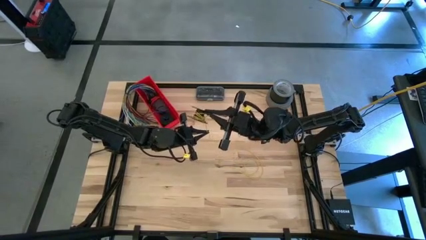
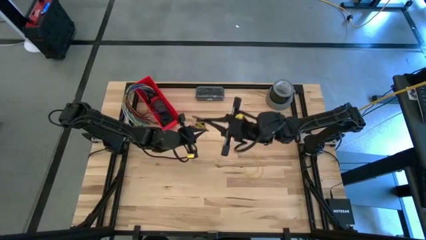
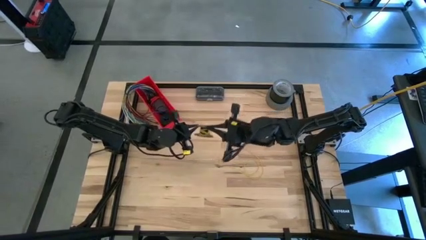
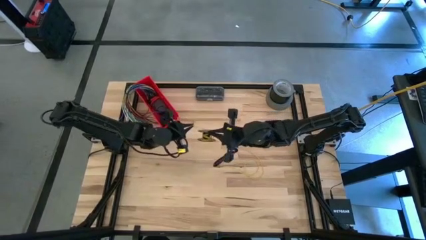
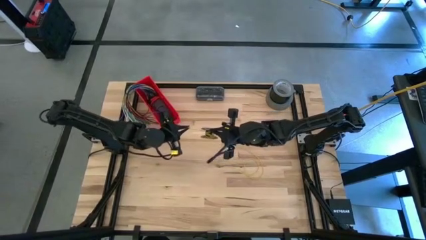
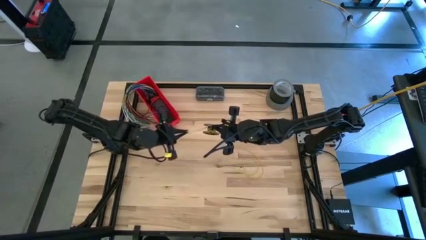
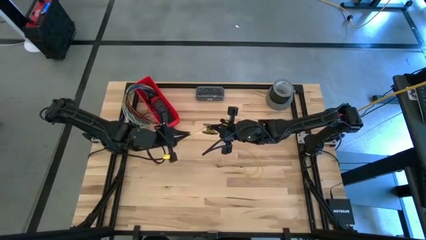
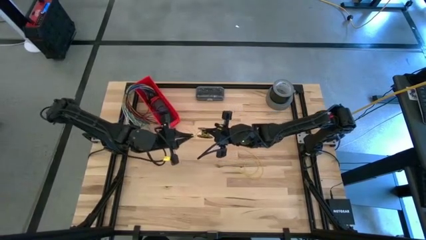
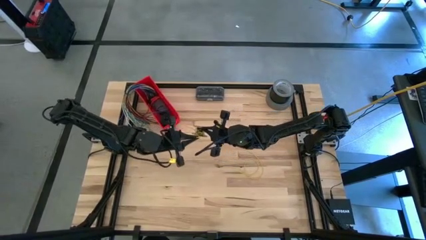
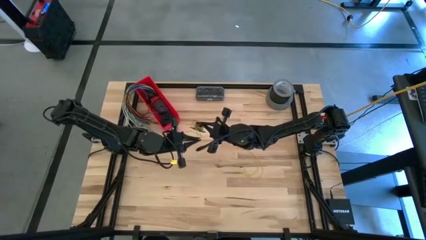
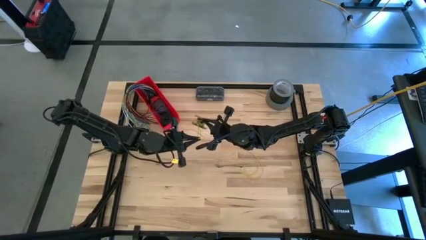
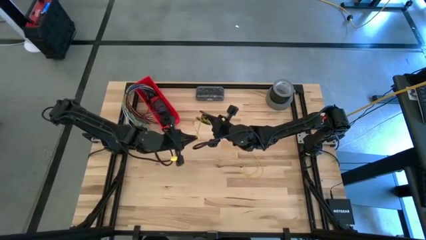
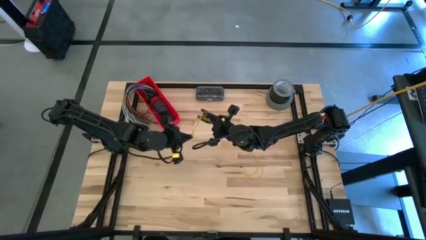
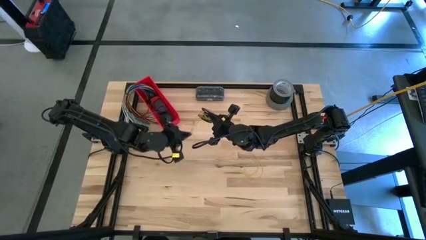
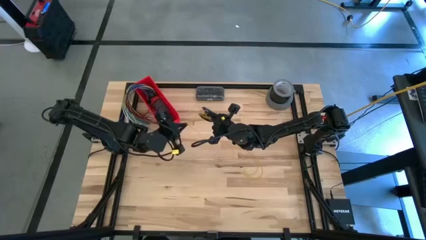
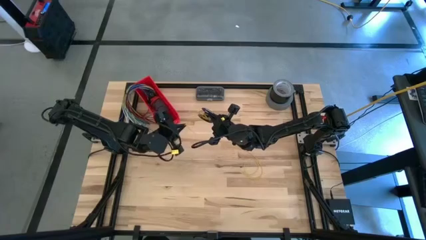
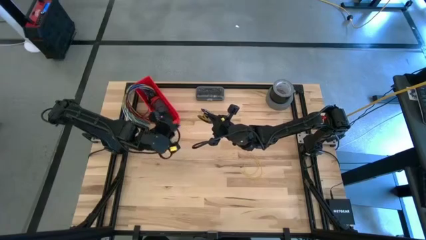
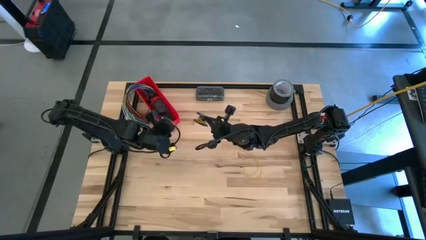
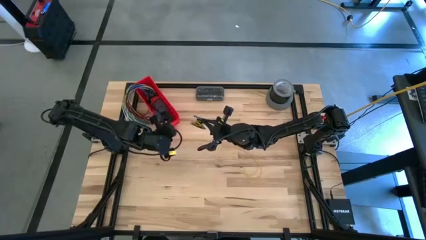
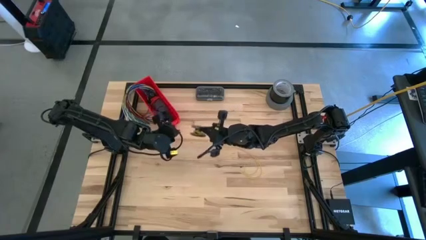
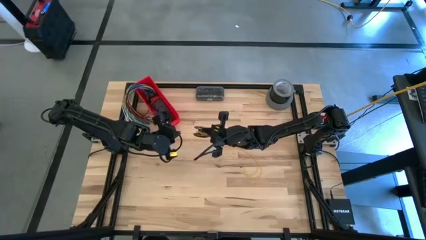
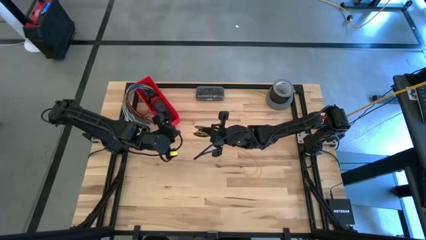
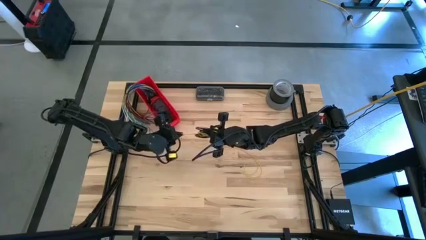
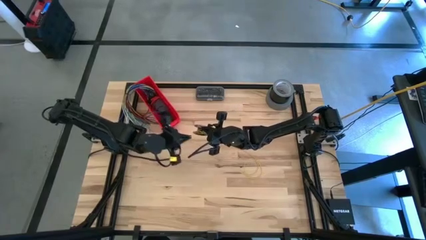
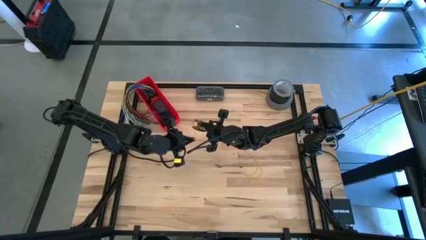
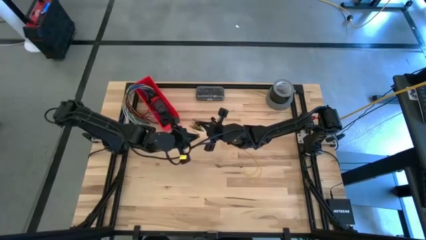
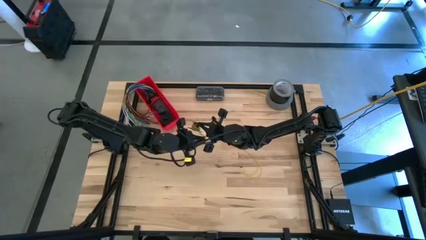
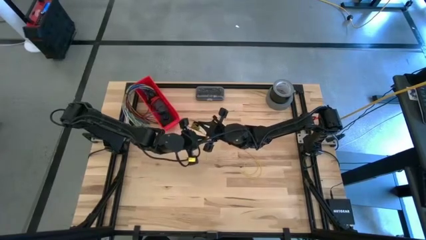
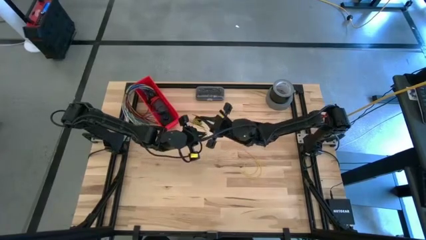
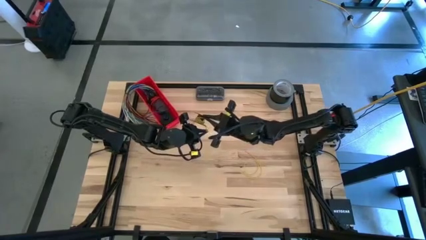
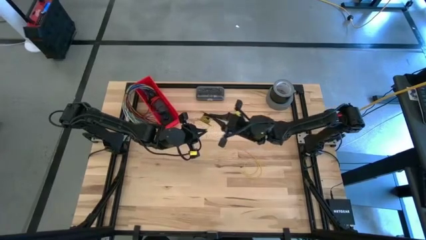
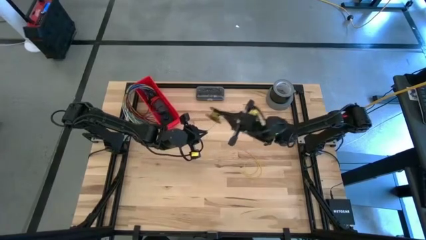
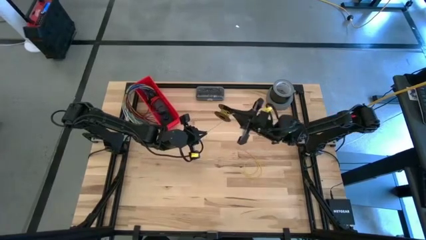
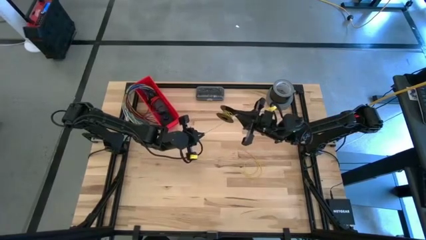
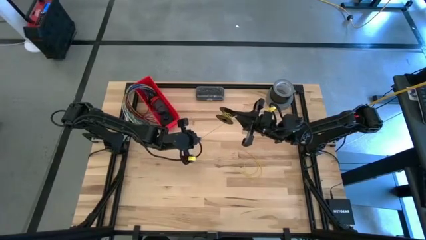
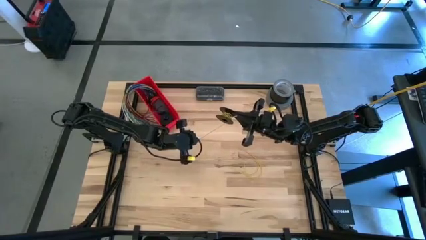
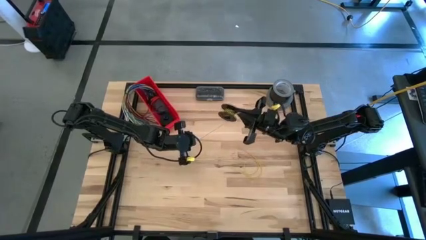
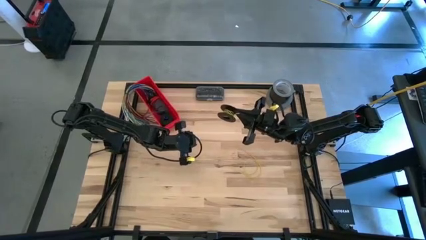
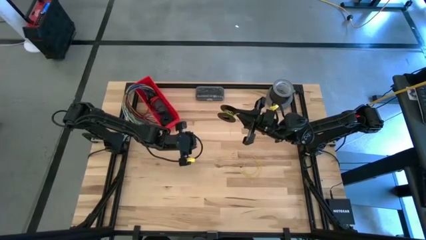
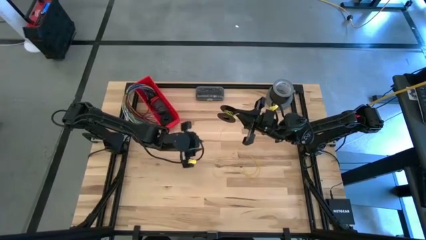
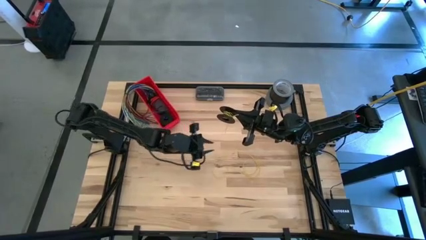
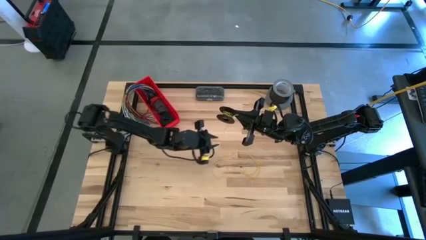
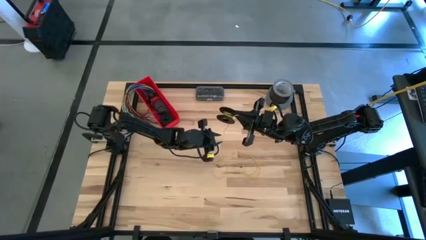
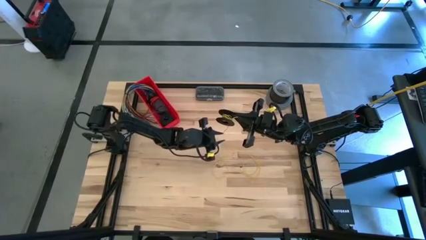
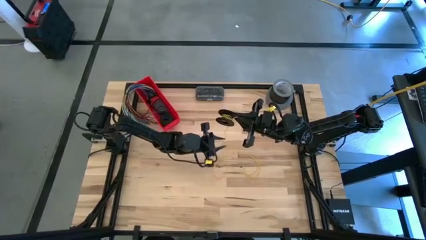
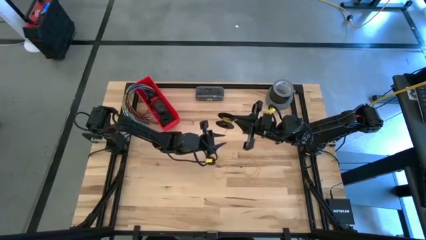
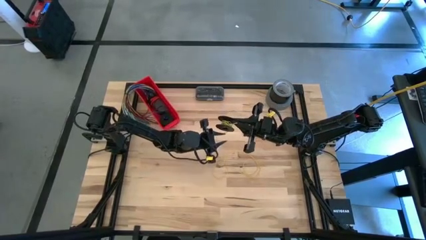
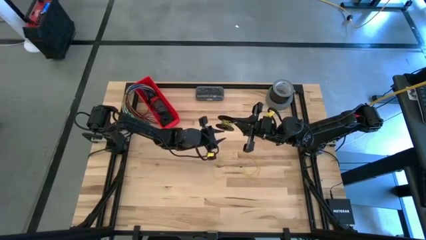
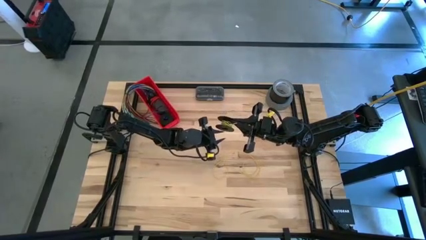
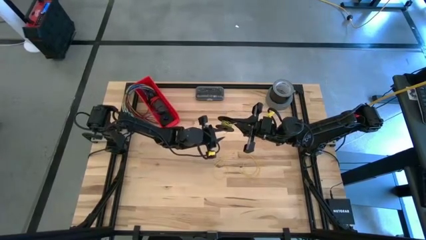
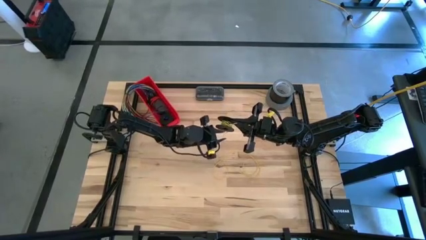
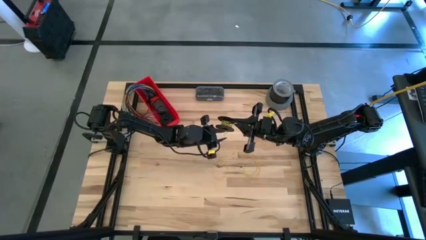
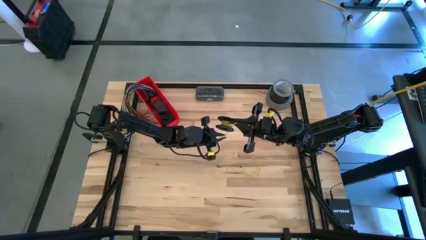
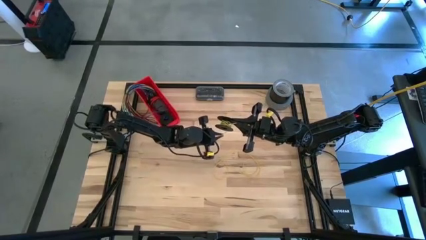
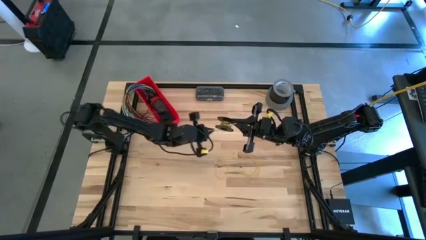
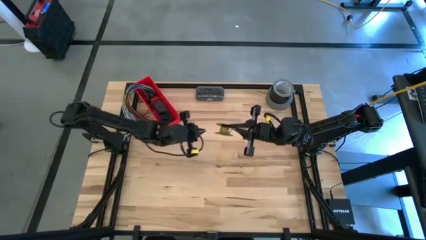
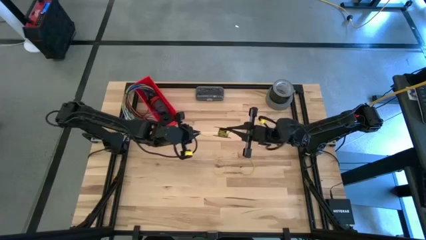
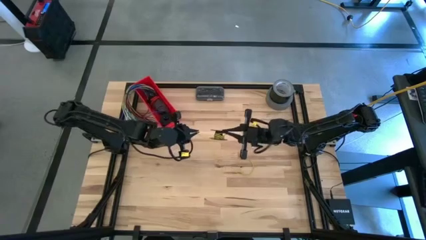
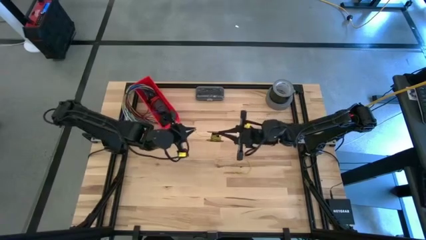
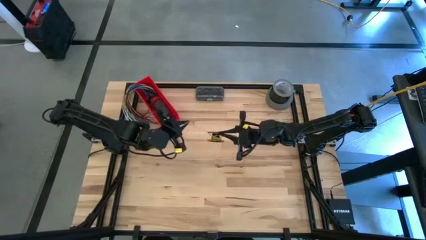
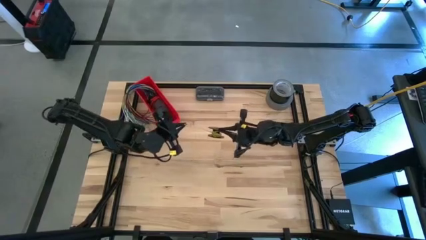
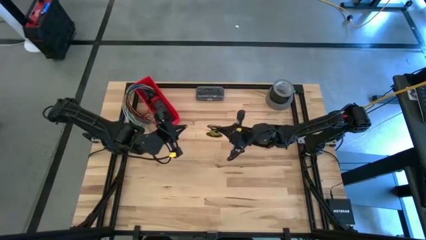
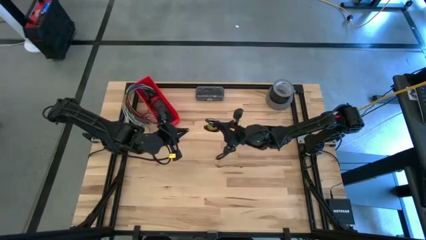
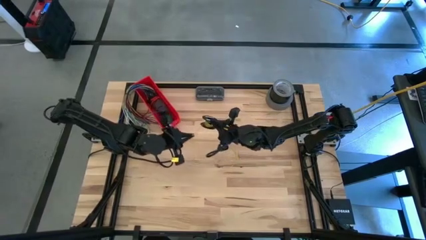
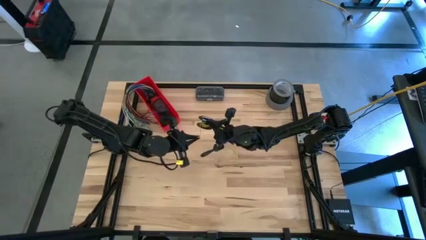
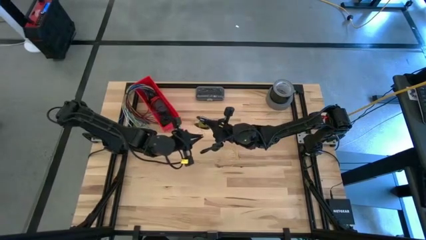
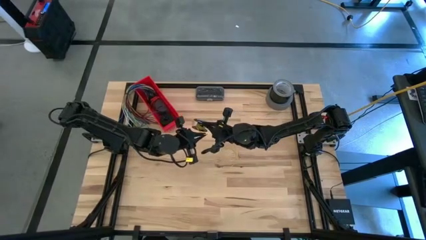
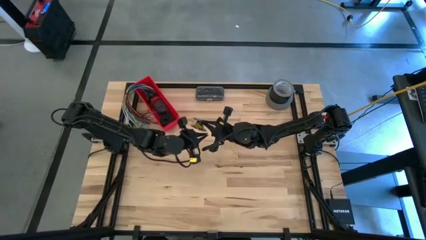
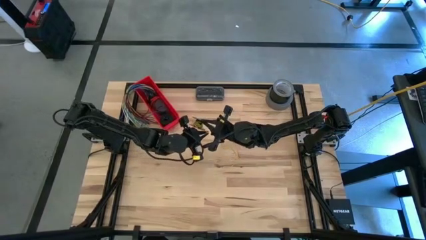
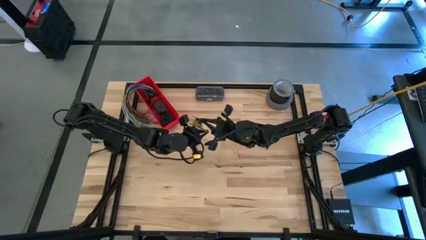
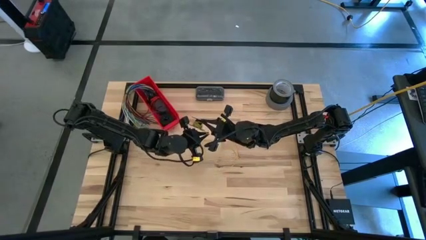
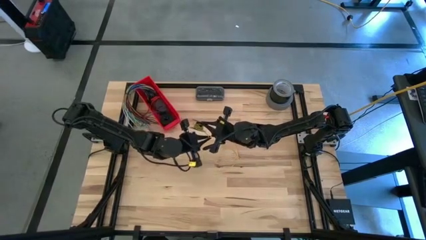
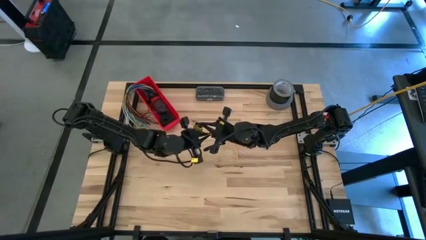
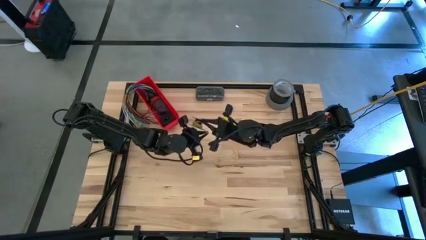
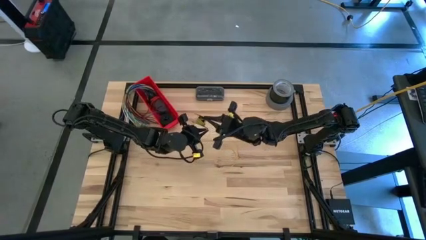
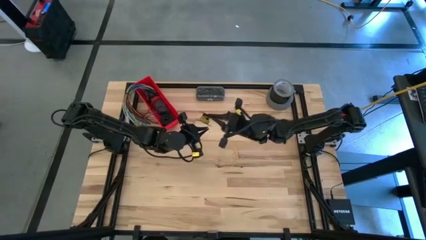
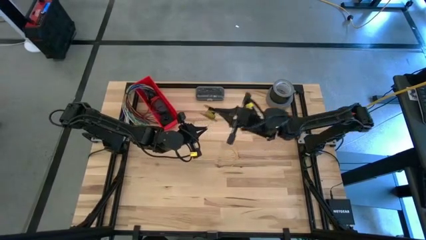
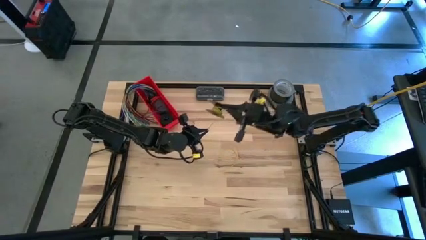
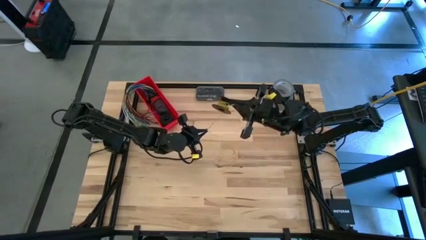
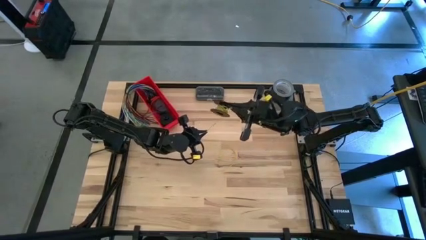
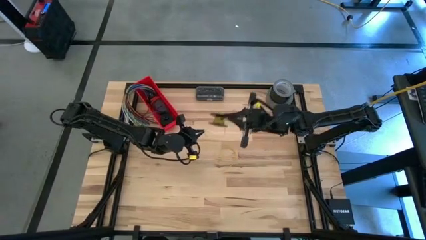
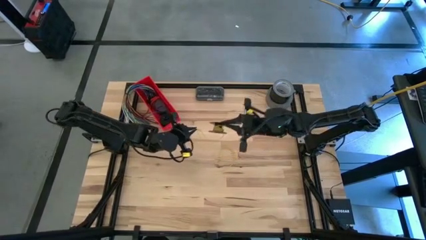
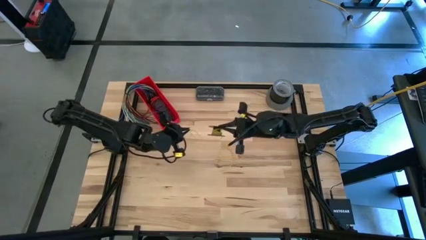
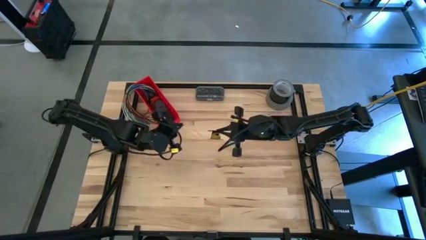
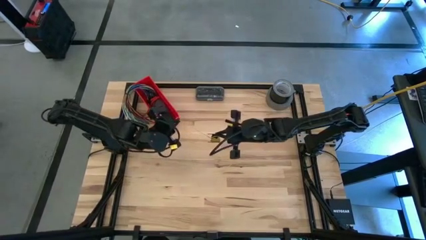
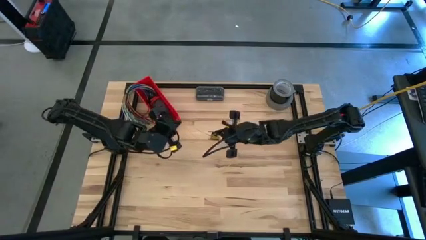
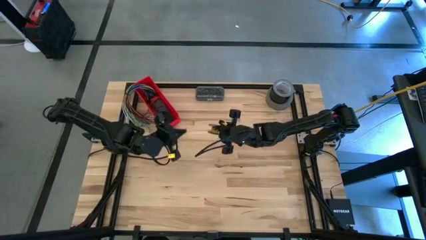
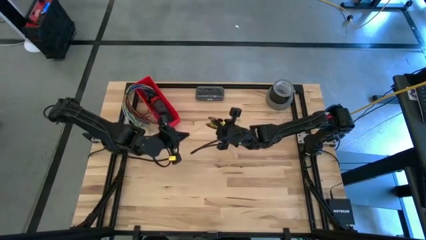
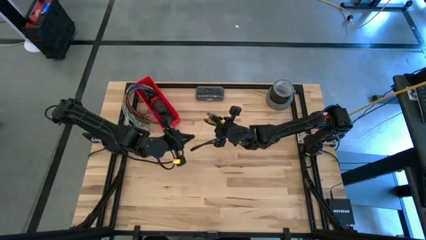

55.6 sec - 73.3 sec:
Task: Coil cords
Coil the yellow wire on the spool
